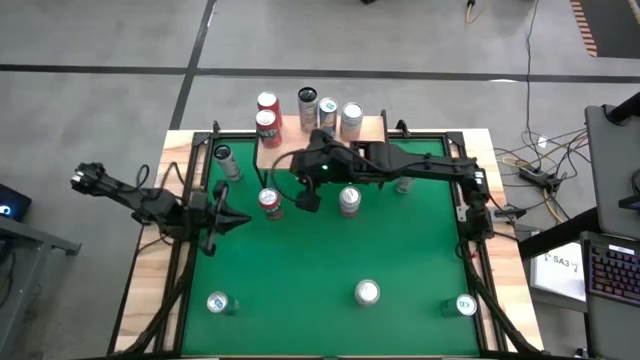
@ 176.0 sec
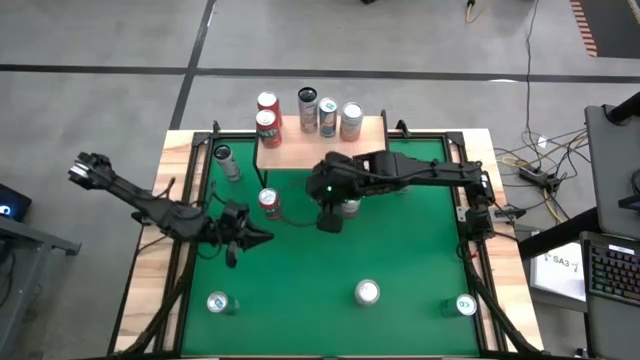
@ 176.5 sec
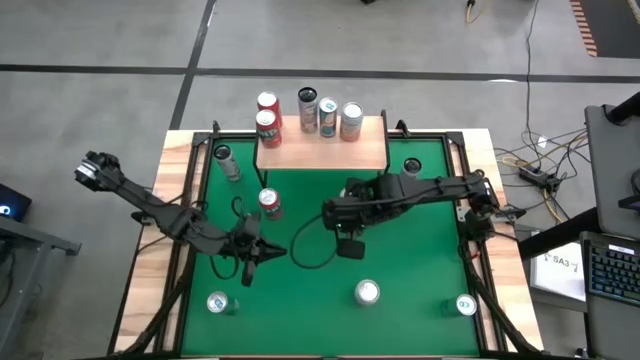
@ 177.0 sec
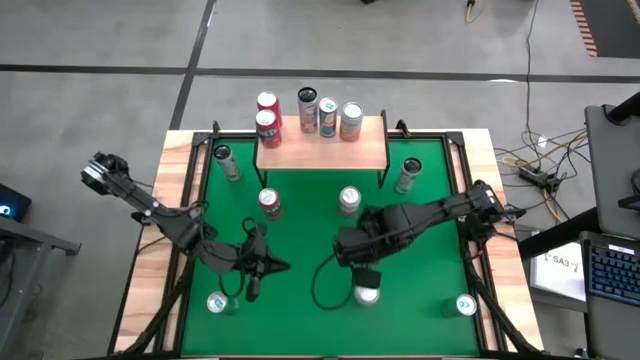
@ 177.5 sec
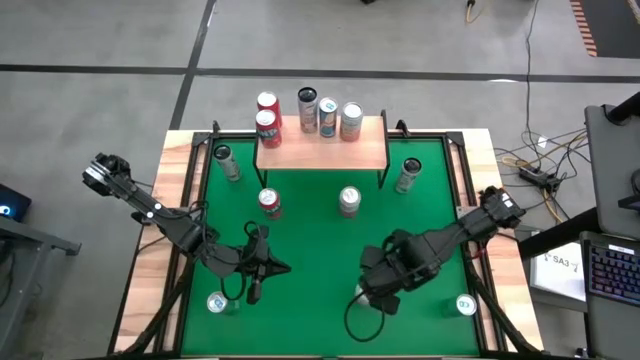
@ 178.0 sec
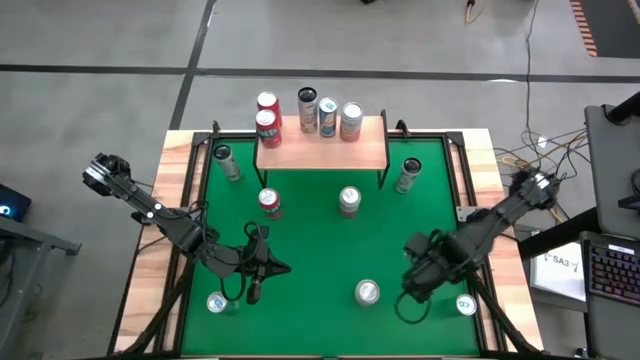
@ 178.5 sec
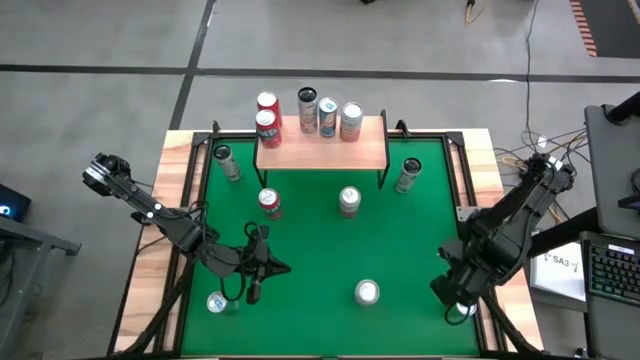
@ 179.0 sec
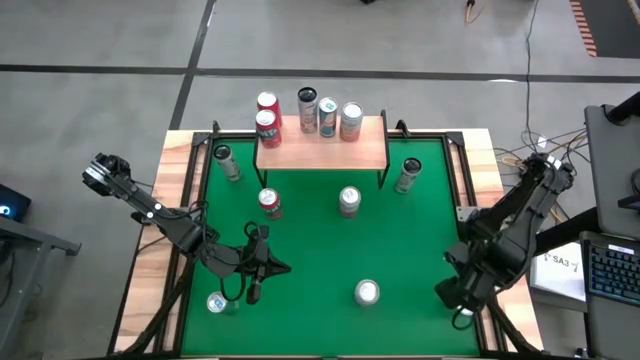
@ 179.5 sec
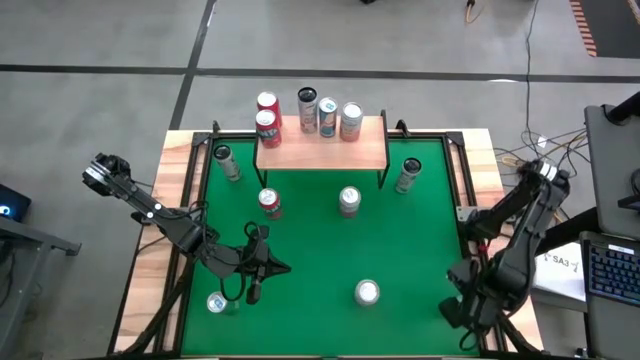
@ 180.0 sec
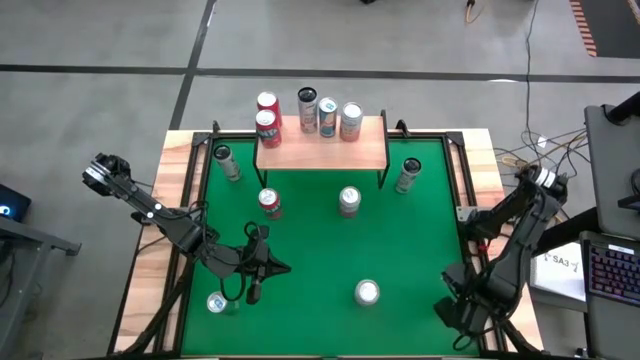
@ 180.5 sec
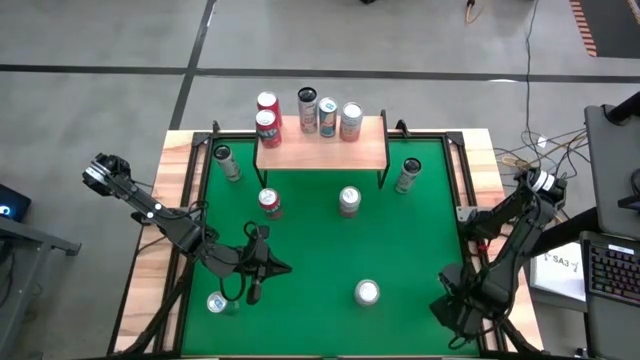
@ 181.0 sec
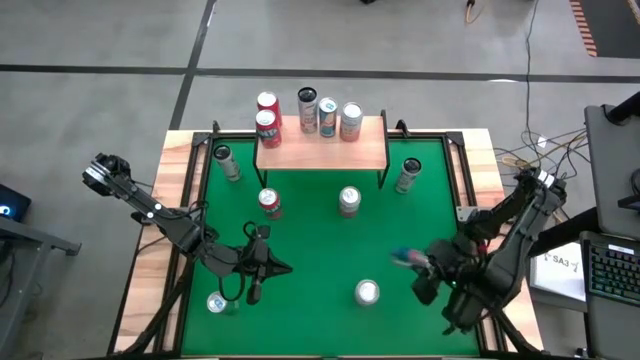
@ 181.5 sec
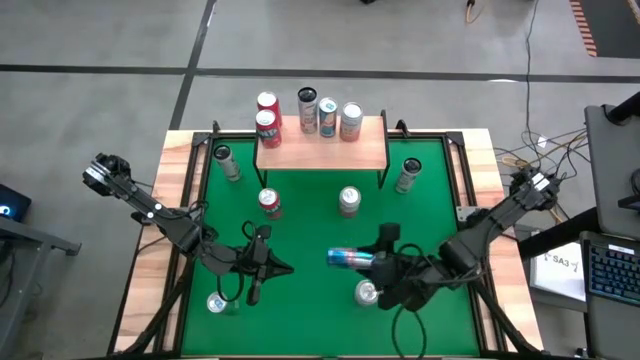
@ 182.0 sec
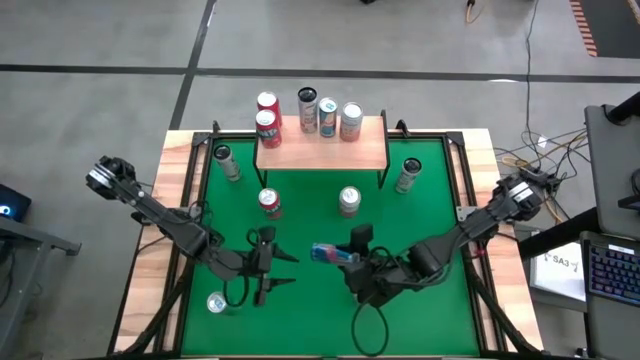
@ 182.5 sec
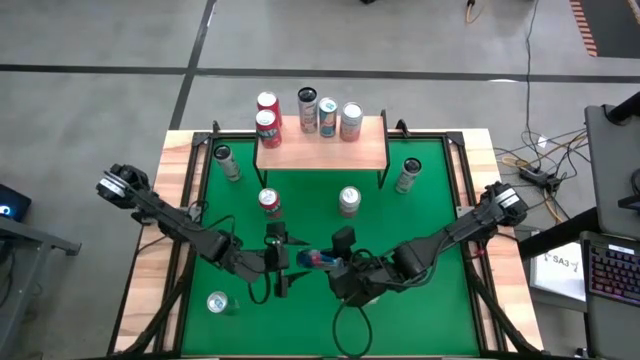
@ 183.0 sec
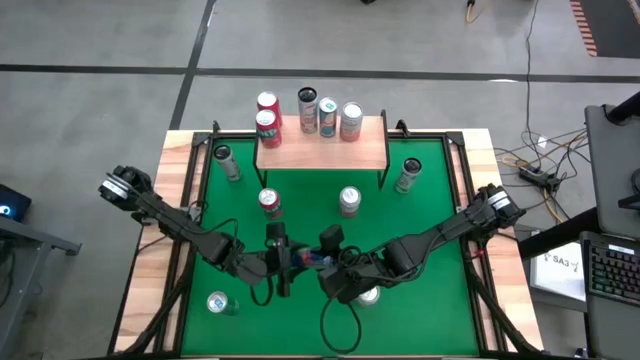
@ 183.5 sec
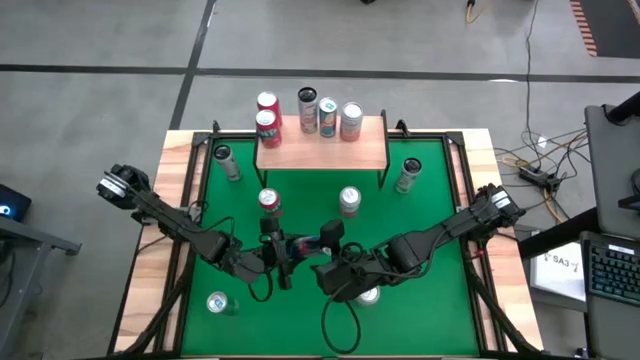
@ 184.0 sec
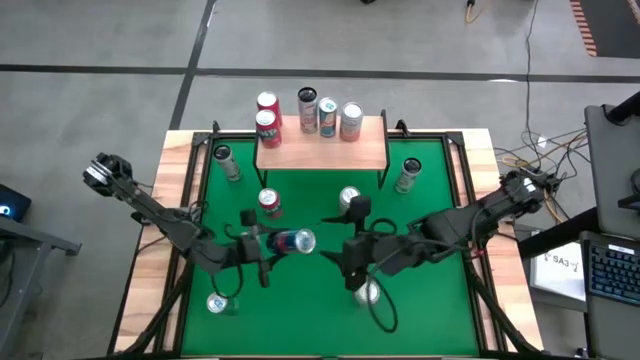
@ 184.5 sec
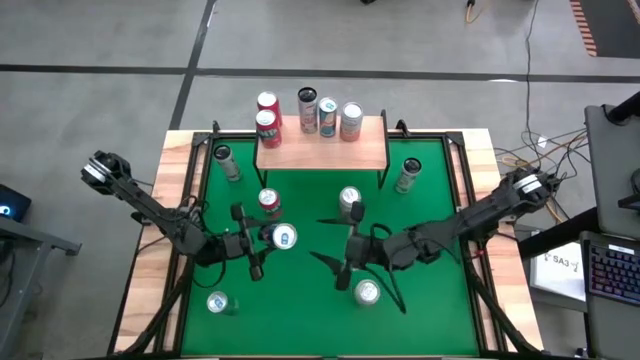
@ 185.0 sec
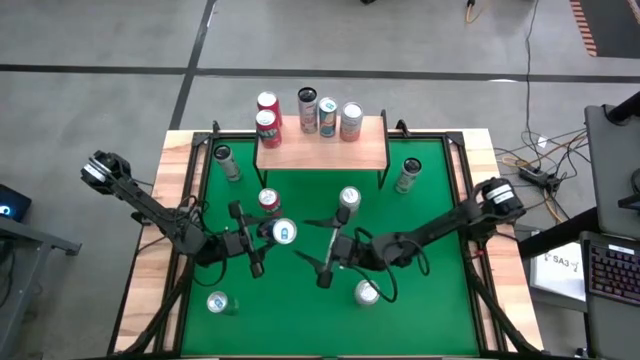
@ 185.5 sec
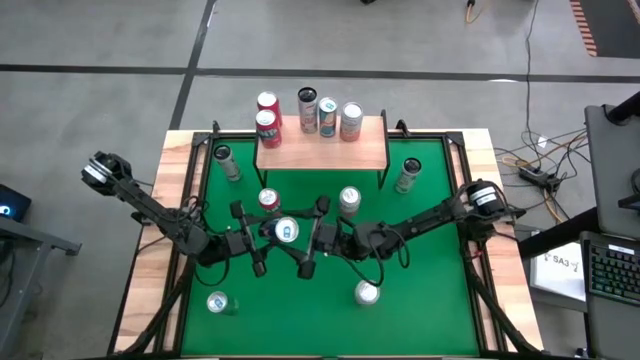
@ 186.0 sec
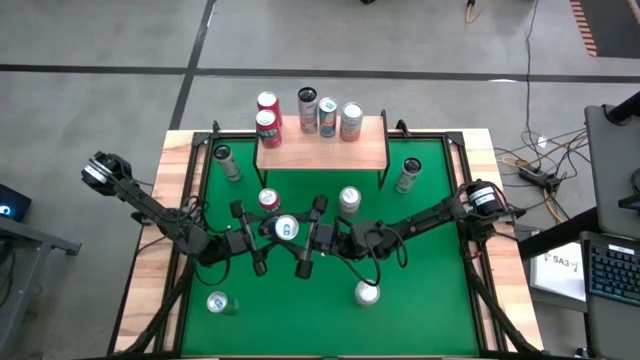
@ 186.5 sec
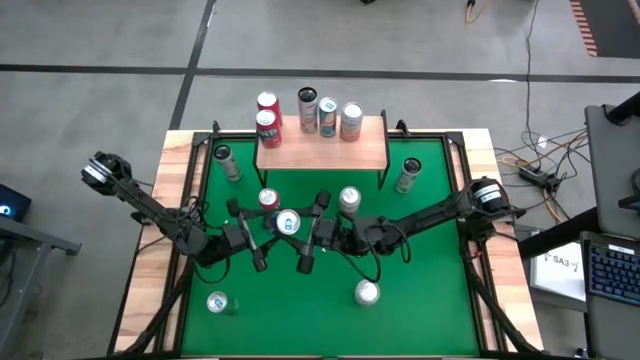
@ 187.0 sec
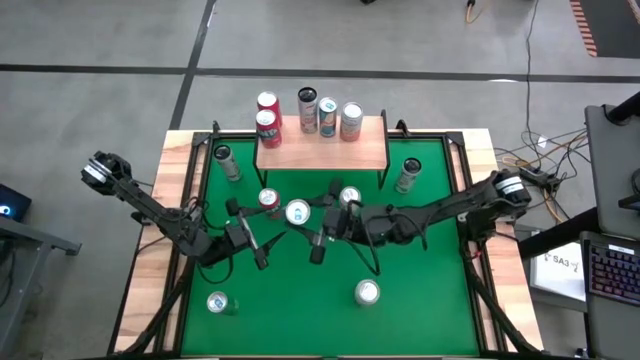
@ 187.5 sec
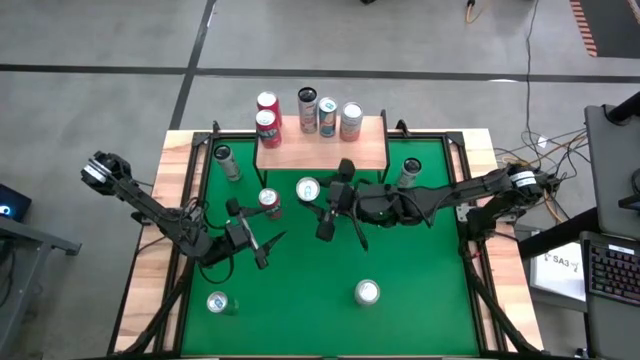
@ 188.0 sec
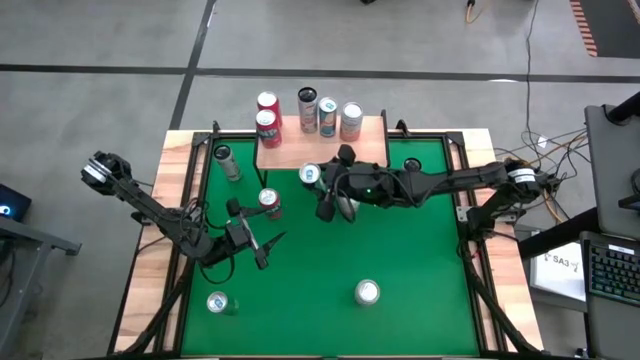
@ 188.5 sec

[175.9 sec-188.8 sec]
Task: Place canned beverage on shelf
Put the right blue soda can on the shelf aligned with other blue soda cans

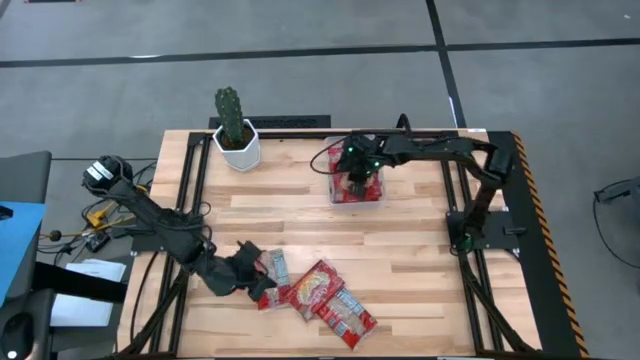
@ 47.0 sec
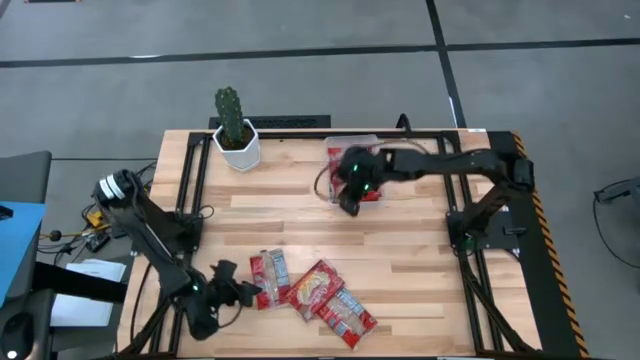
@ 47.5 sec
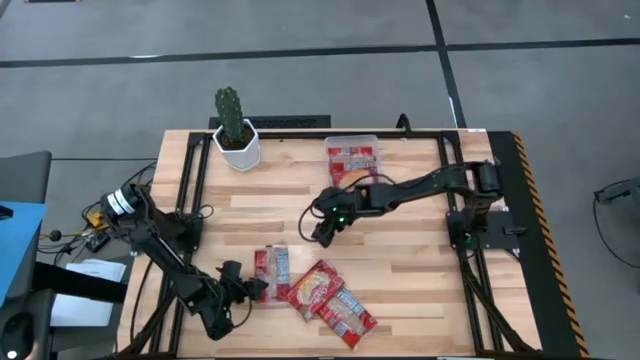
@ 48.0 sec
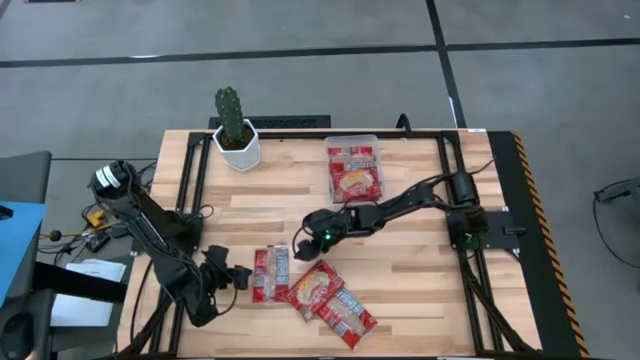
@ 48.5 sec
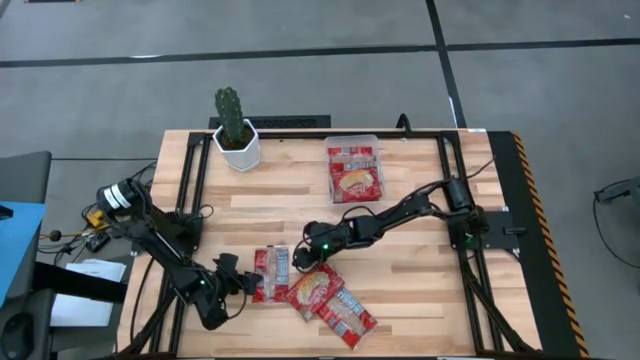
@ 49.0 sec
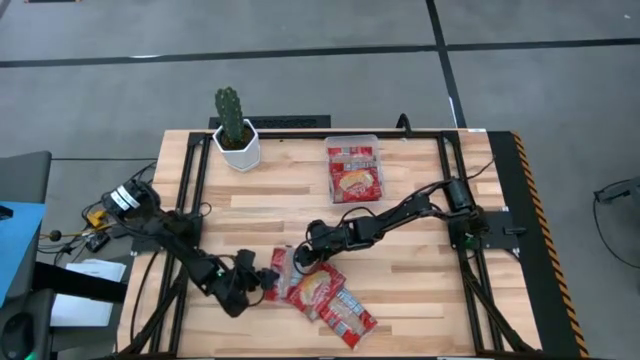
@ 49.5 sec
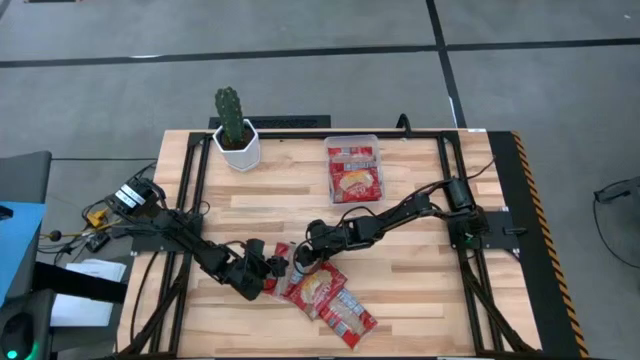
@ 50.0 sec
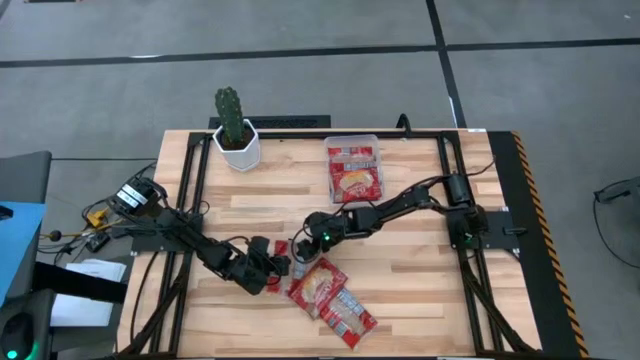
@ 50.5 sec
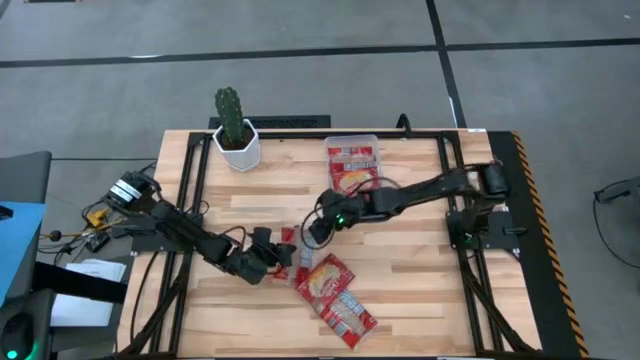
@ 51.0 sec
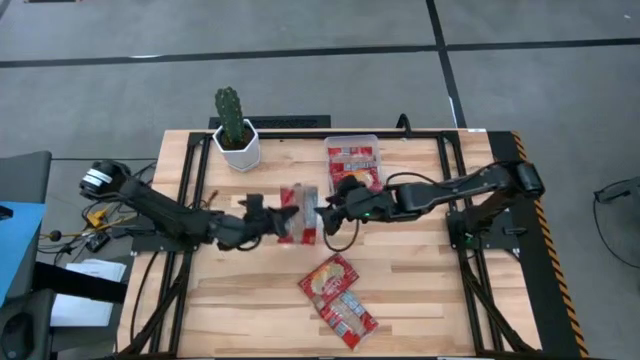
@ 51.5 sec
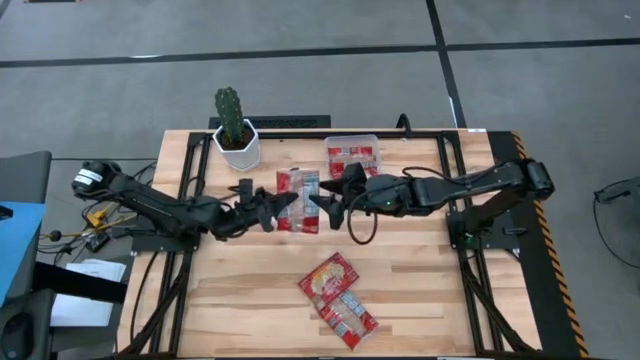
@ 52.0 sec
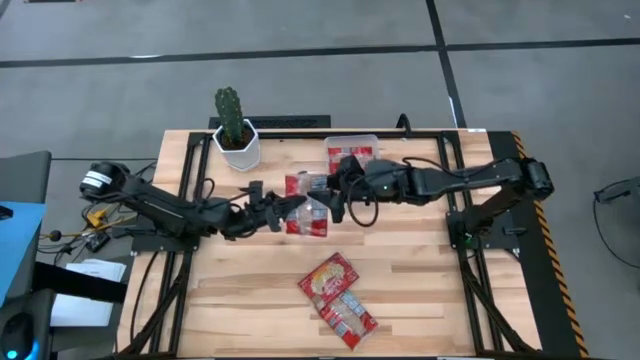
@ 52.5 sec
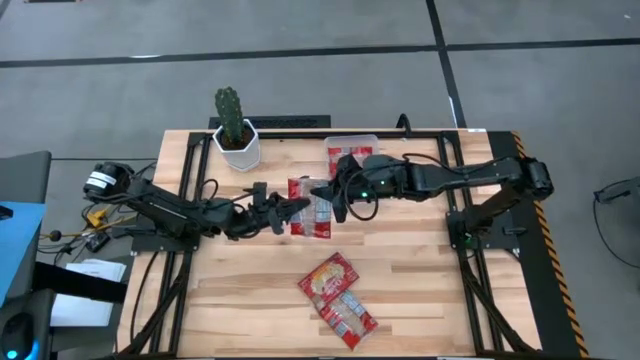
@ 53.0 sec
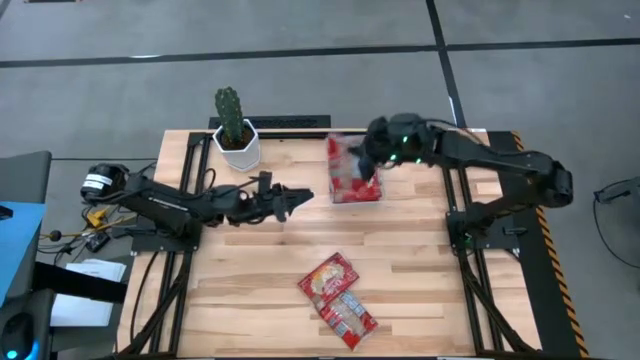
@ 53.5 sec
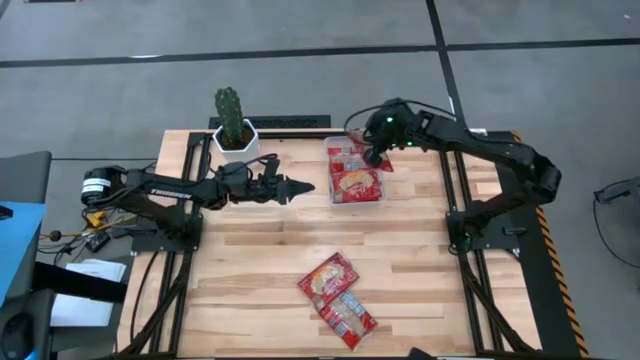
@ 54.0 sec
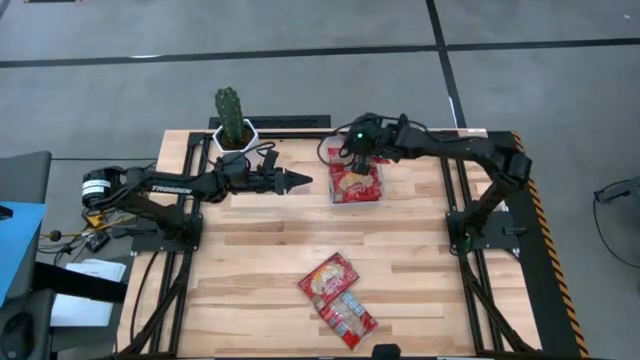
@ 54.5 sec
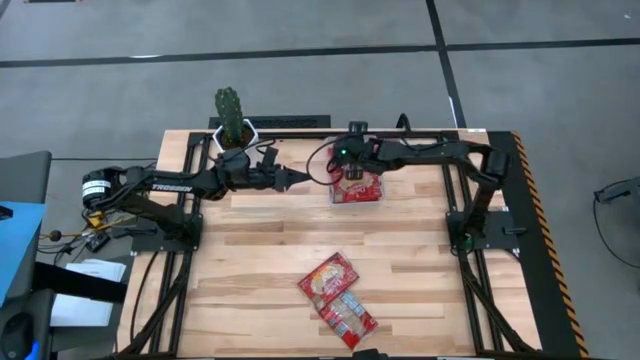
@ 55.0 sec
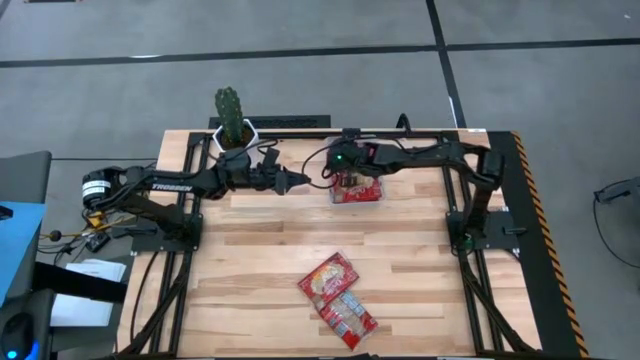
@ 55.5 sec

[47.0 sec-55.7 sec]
Task: Sort popcorn bags into baskets
Put the popcorn bag into the transparent bin
